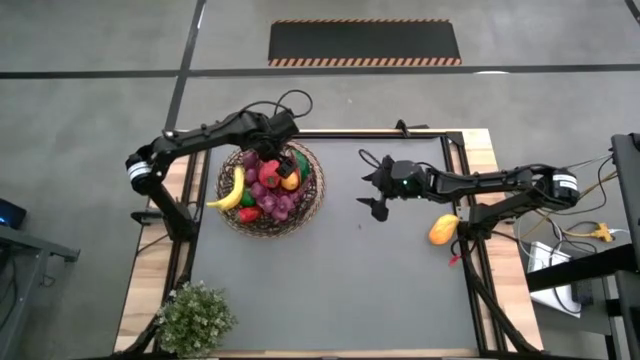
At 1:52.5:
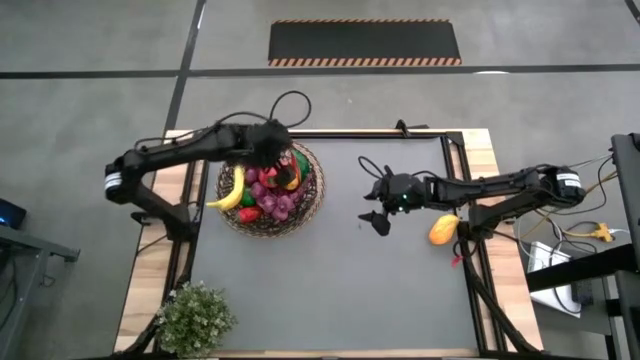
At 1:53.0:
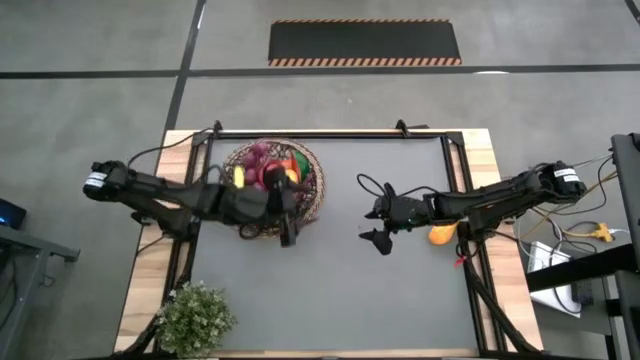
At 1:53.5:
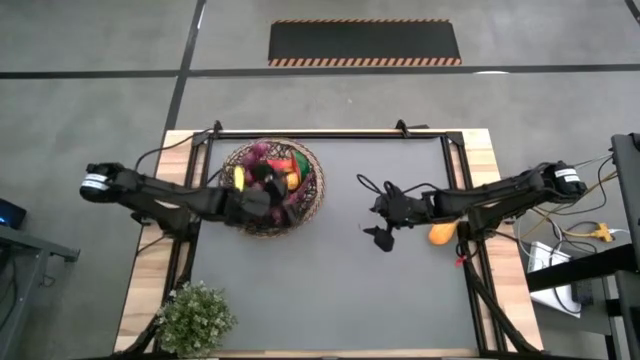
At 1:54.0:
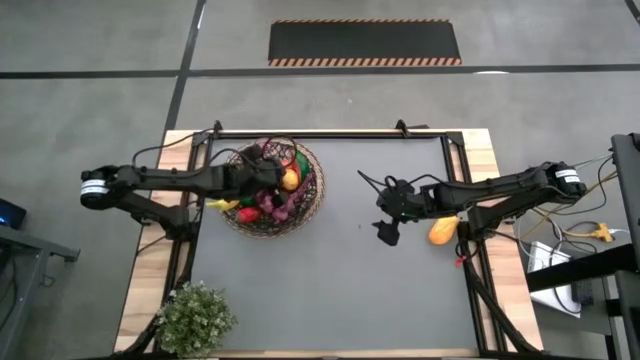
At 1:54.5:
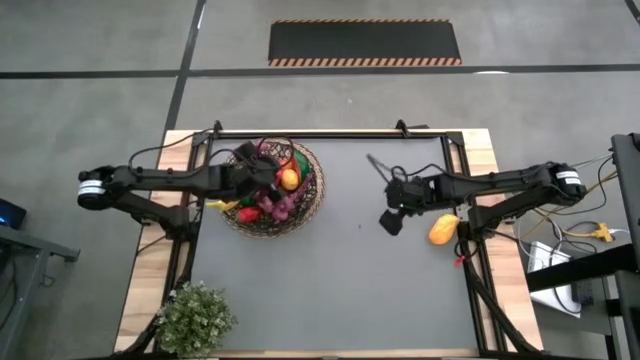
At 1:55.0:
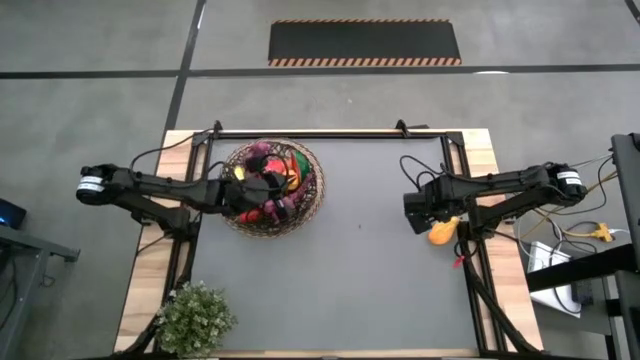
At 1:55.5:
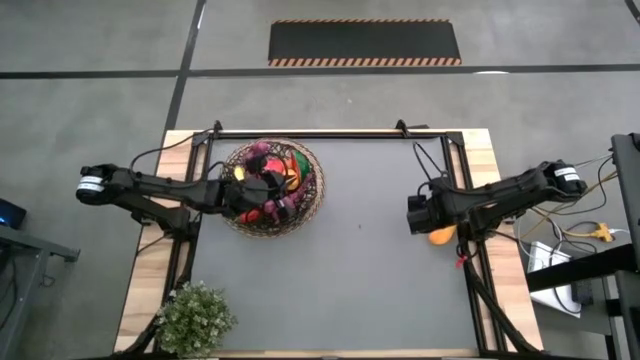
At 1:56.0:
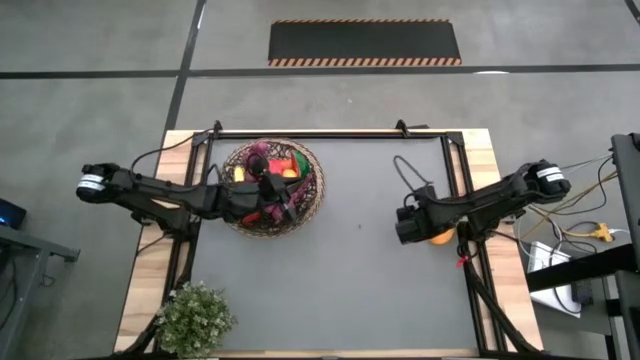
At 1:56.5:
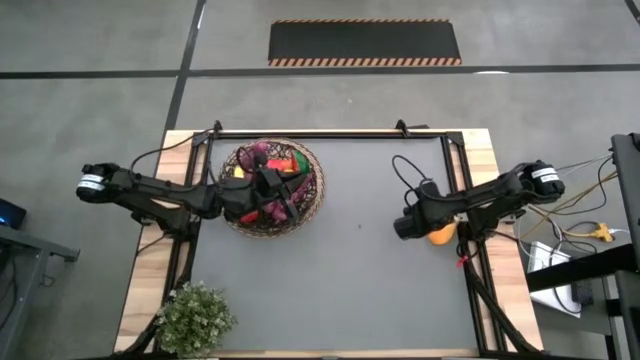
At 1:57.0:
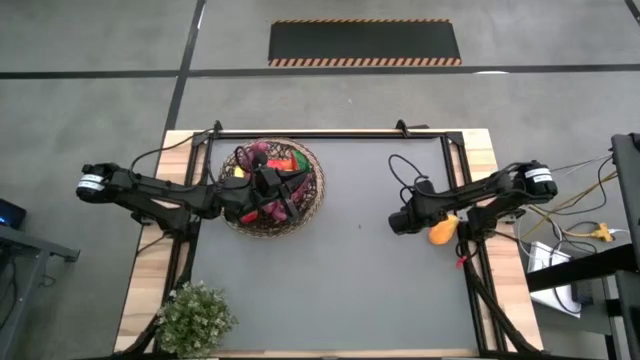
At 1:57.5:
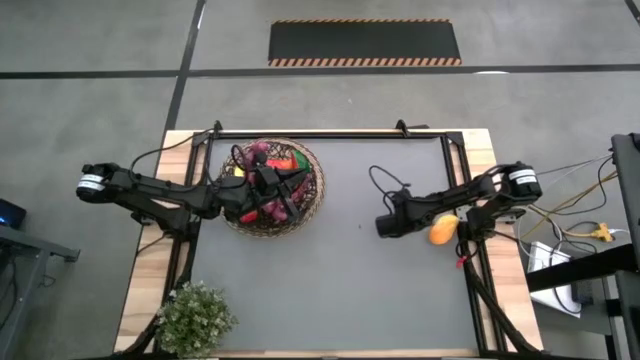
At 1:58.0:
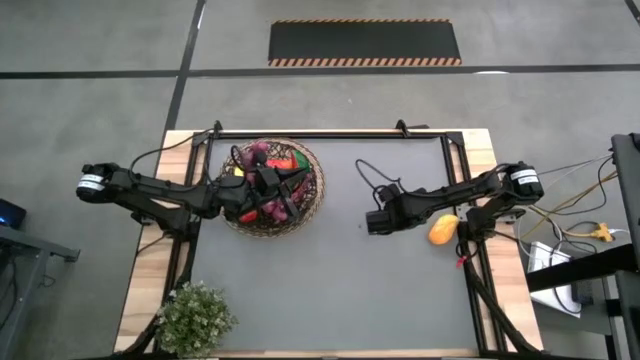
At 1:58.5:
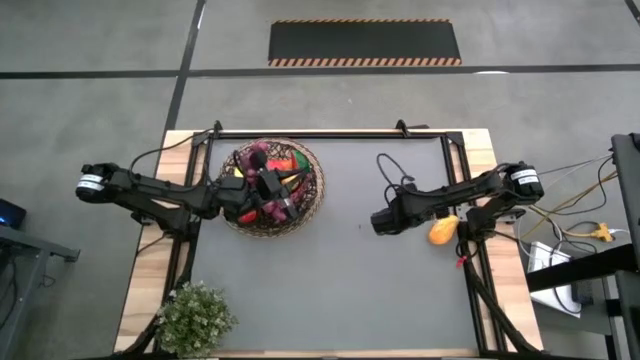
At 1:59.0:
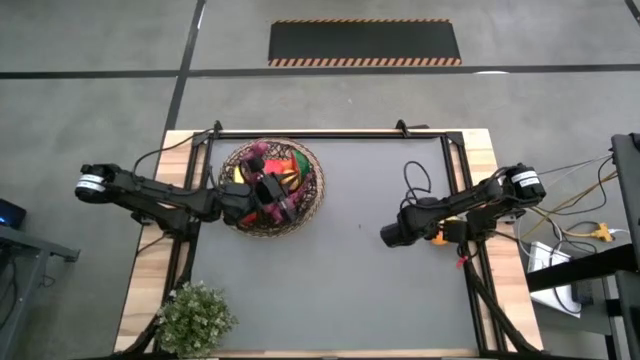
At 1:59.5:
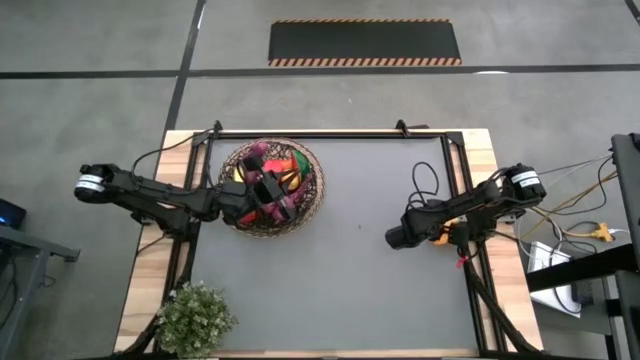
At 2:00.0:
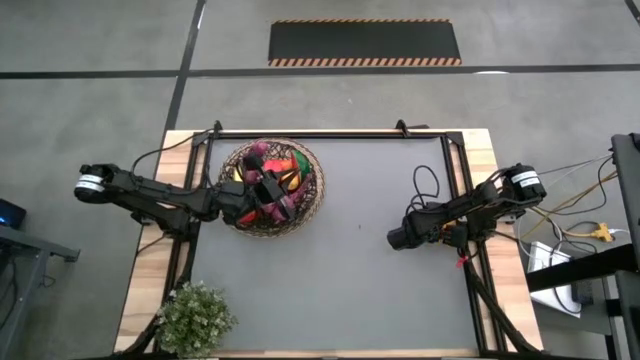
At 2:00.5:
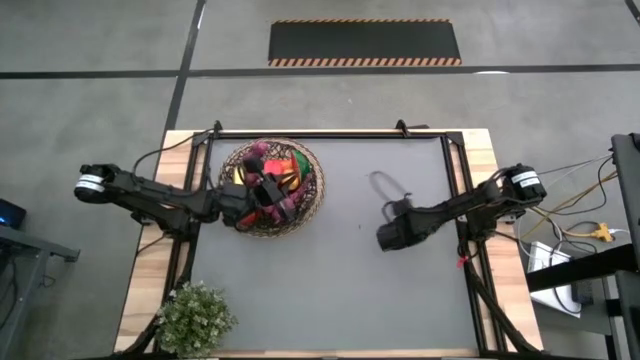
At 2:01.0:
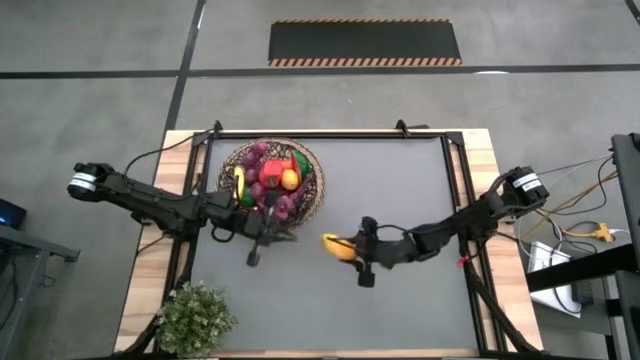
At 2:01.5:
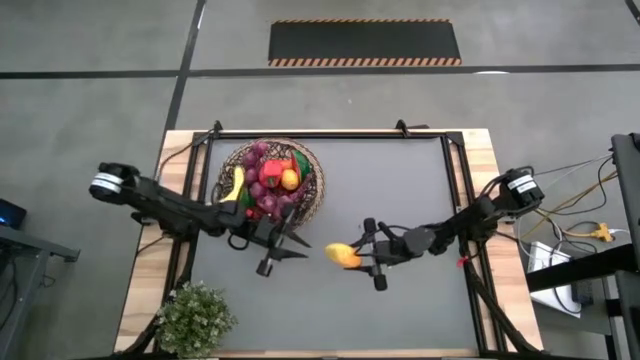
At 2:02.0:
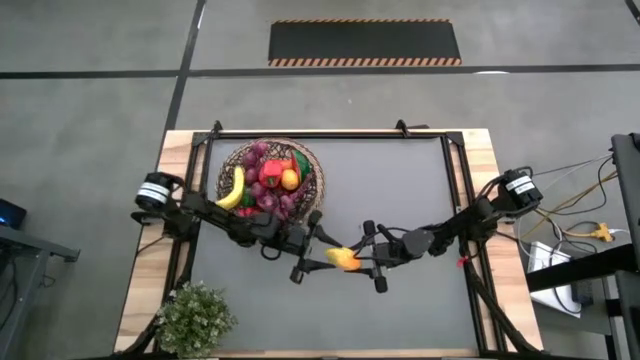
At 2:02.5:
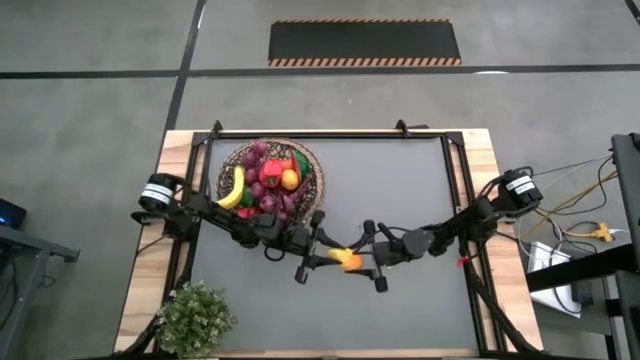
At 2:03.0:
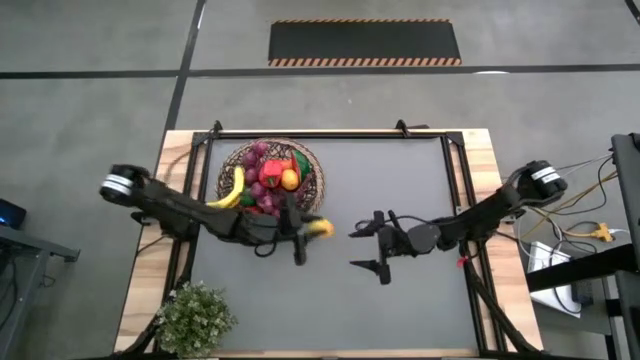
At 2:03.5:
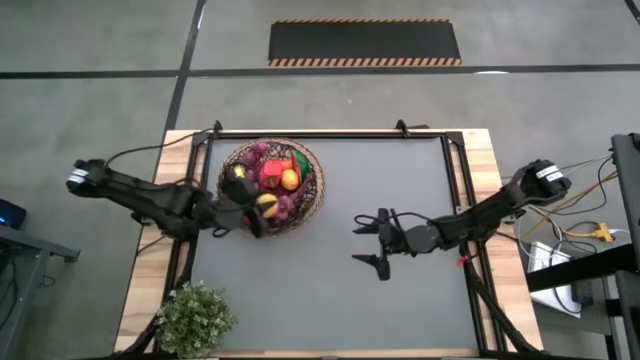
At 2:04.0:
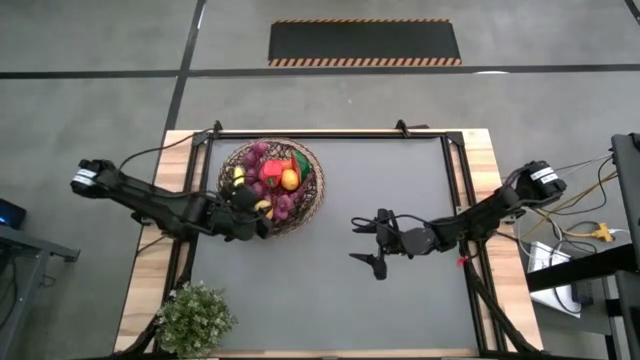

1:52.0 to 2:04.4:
Task: Build produce basket
Put the yellow mango into the wire basket

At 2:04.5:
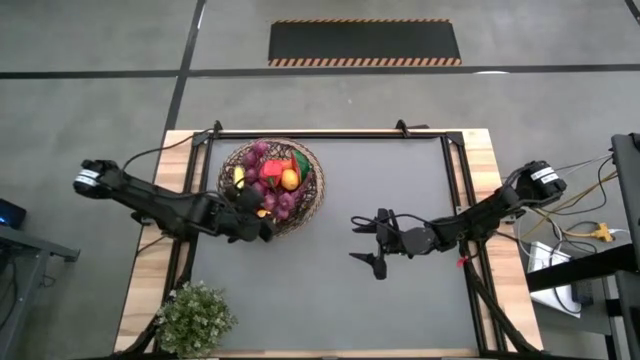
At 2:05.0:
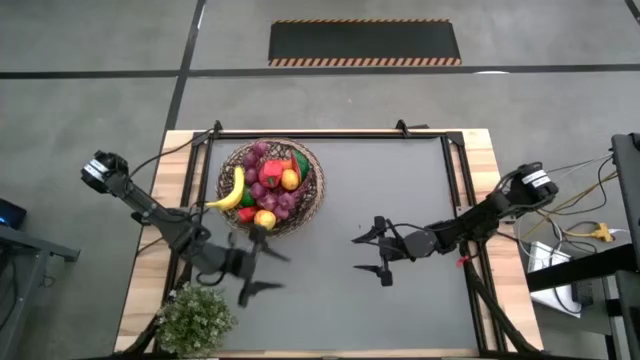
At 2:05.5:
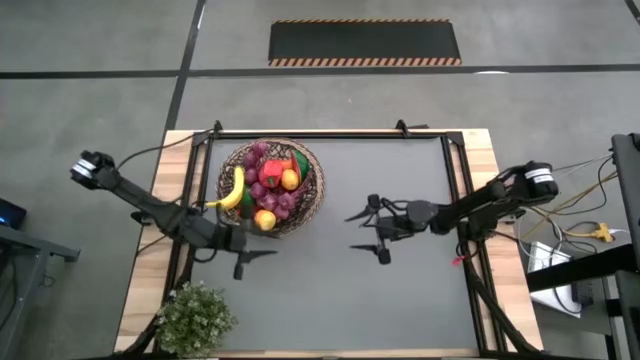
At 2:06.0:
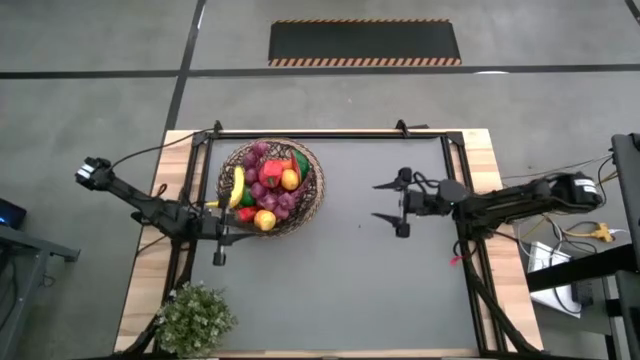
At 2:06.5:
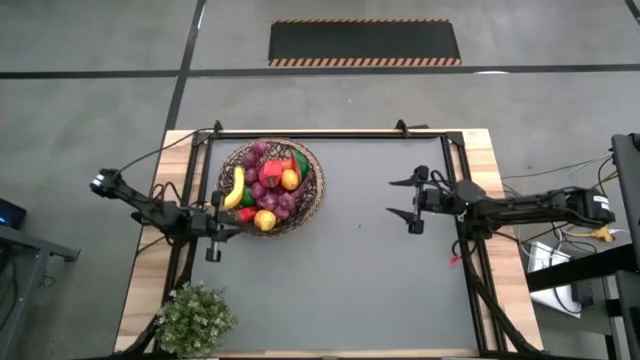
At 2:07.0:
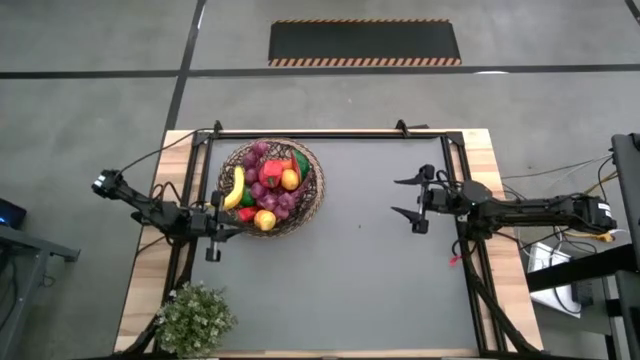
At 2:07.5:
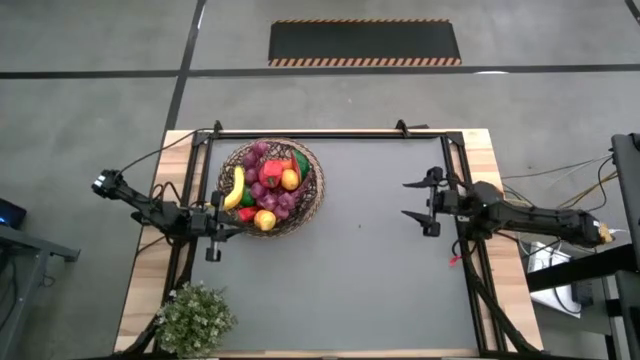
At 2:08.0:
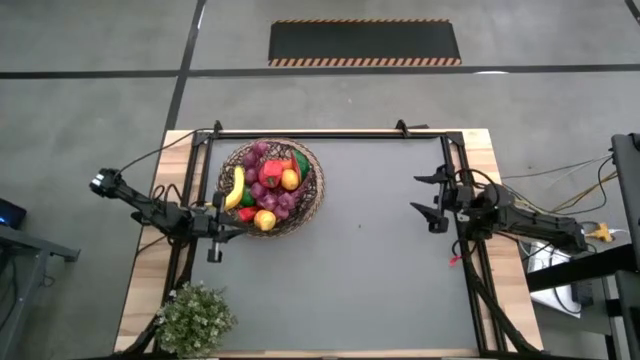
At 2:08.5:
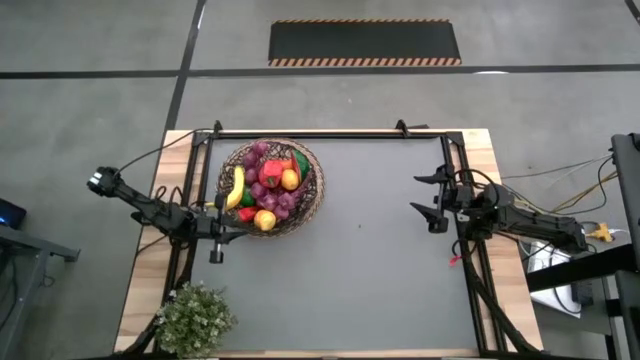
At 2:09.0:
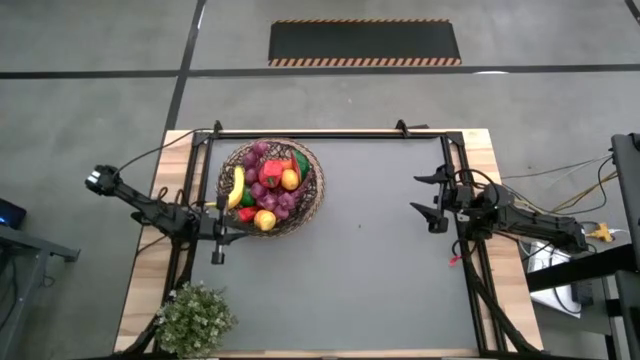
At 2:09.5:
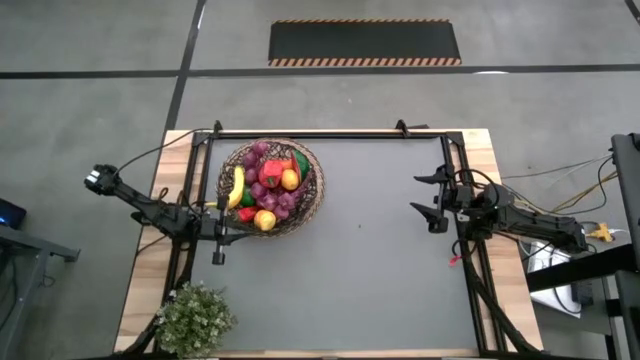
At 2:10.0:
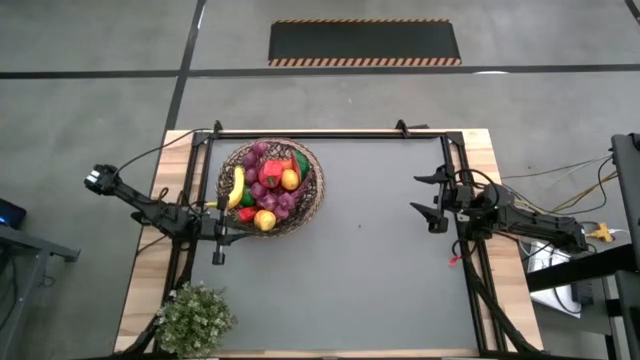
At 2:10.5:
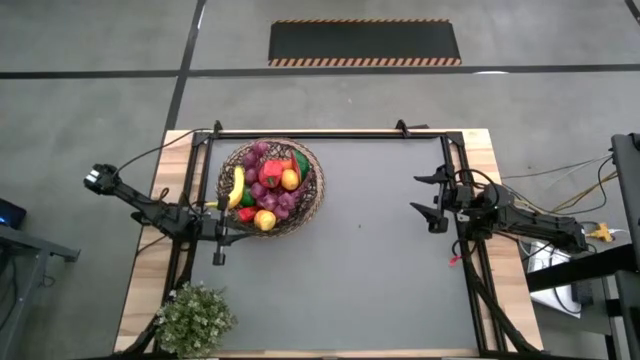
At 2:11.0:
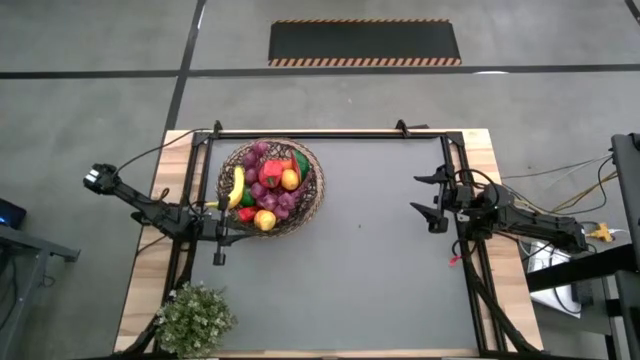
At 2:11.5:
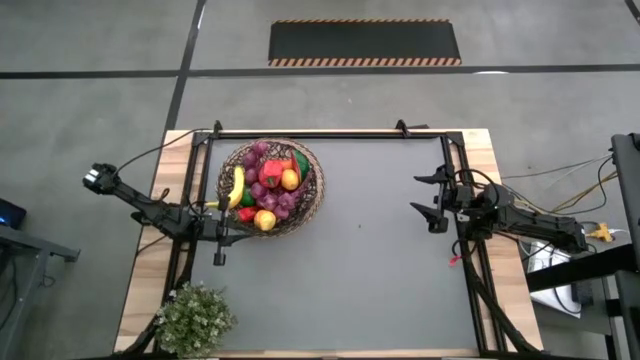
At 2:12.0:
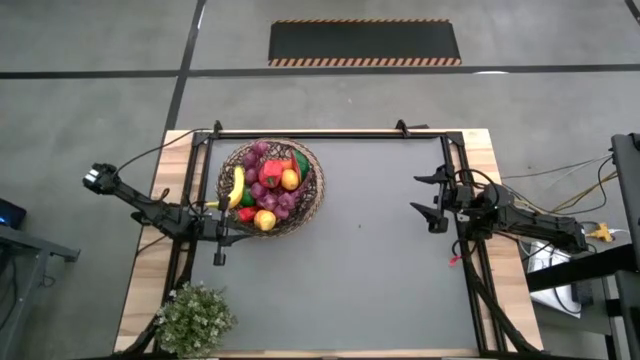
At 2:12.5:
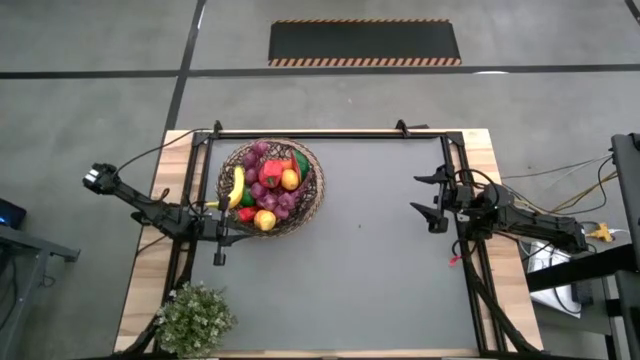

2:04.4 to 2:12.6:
Return to Home Position

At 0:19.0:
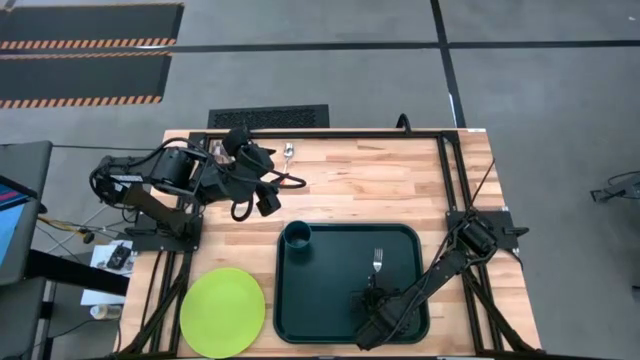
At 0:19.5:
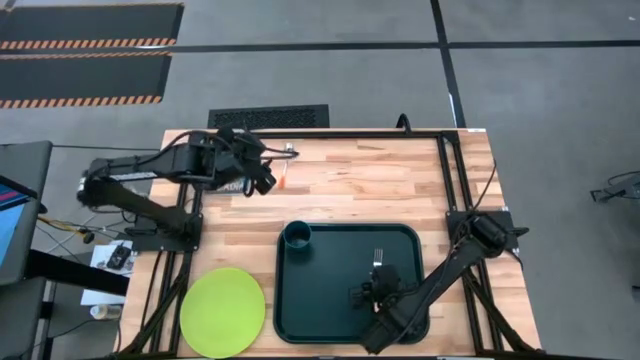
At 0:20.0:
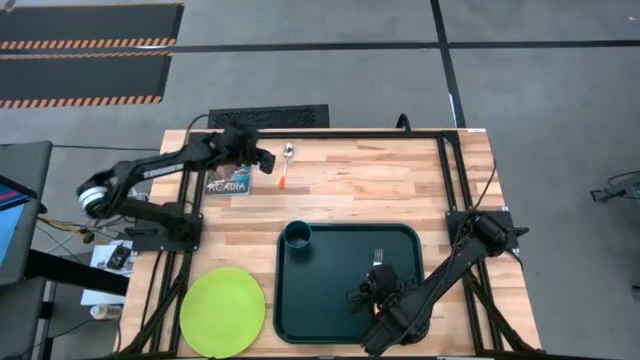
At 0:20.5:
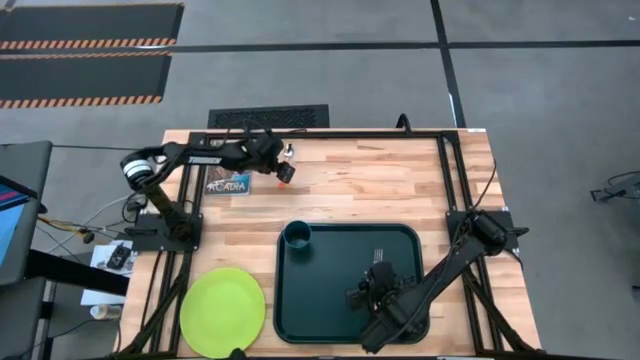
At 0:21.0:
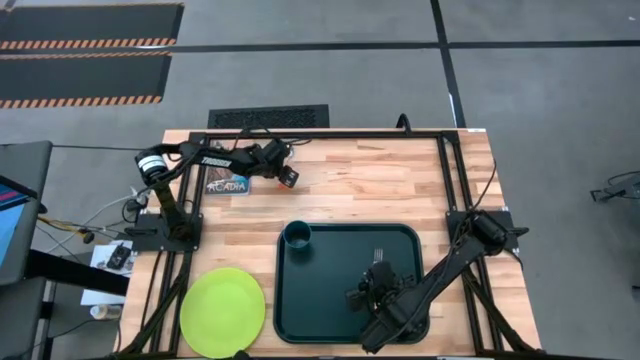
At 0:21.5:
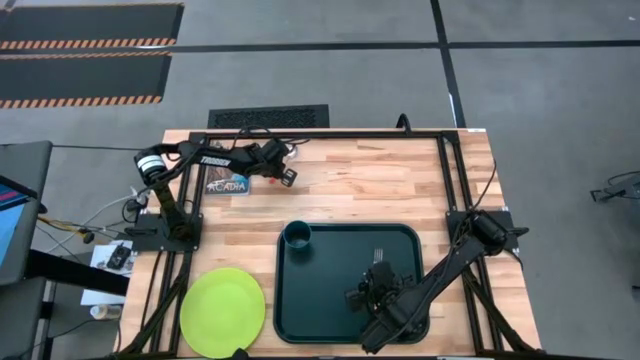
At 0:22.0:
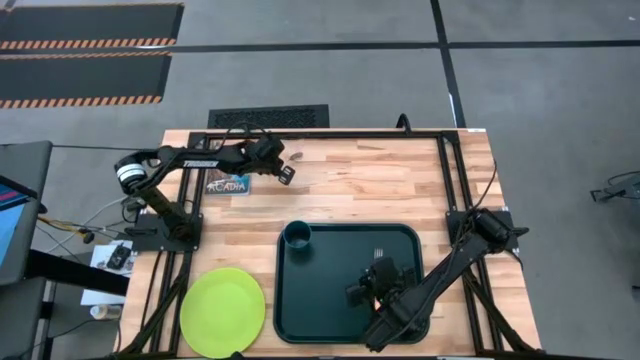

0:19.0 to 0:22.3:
Task: Pick and place plate/cup/fork/spoon on tray
Put the orange spoon on the black tray to the right of the light orange fork
